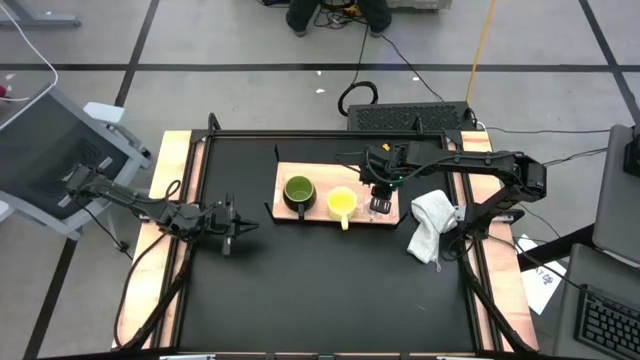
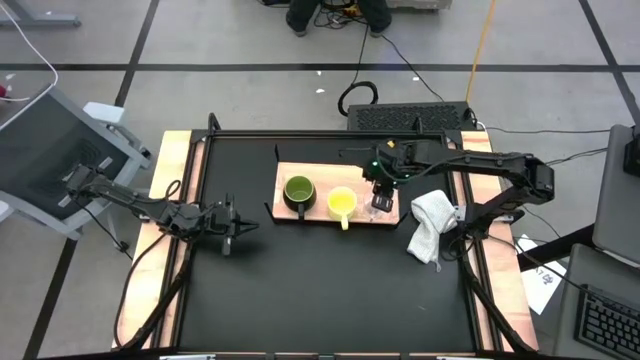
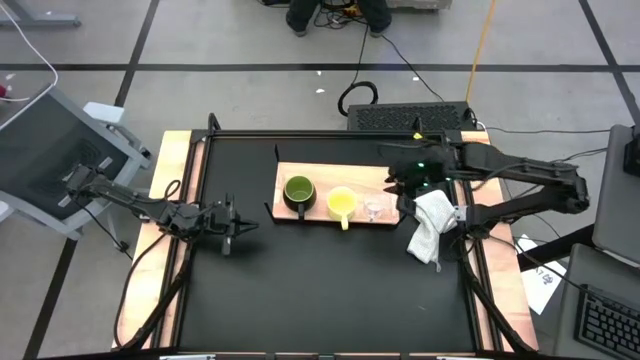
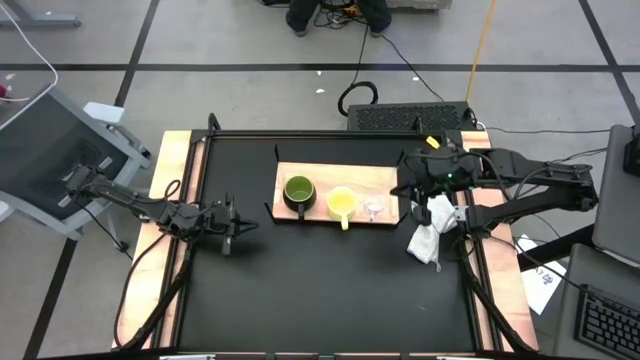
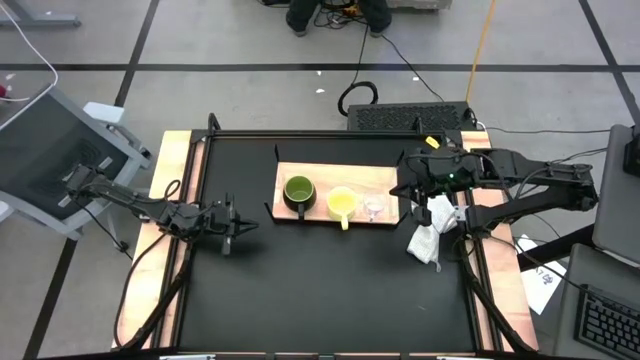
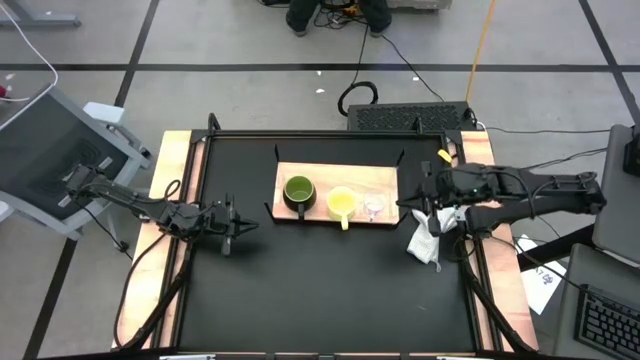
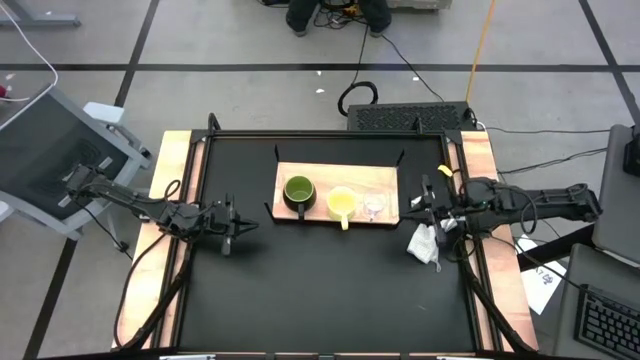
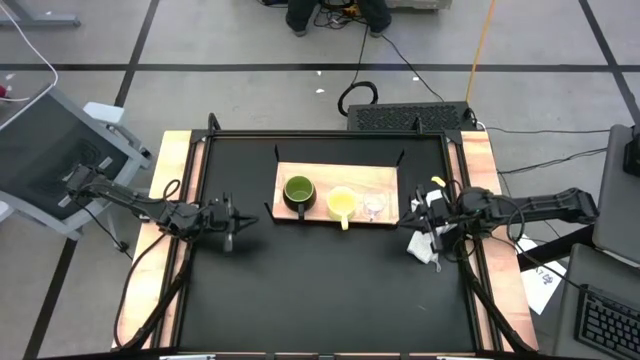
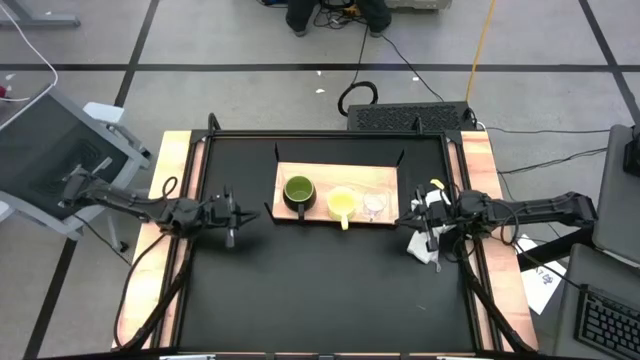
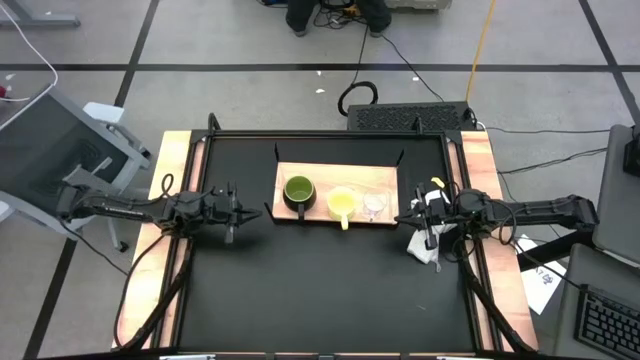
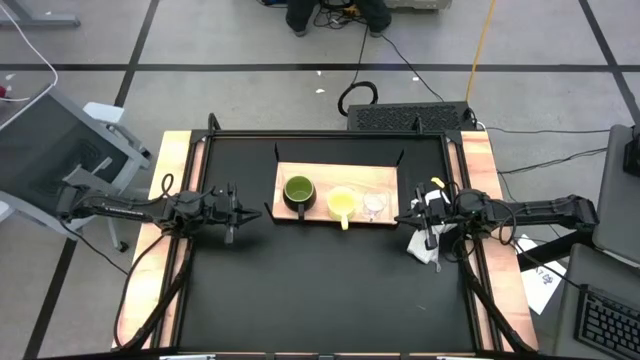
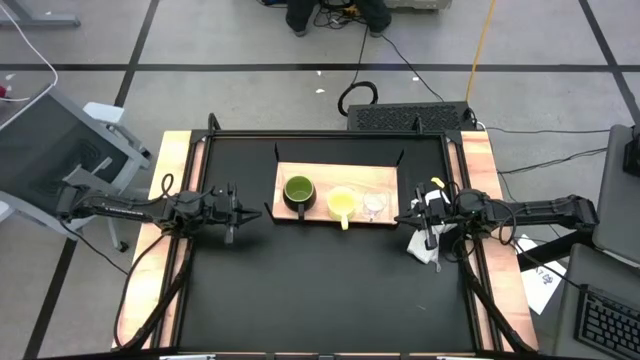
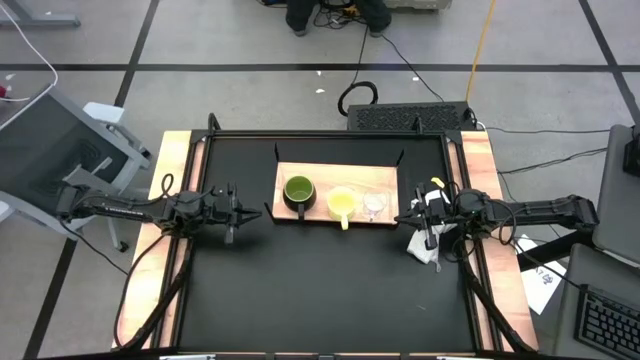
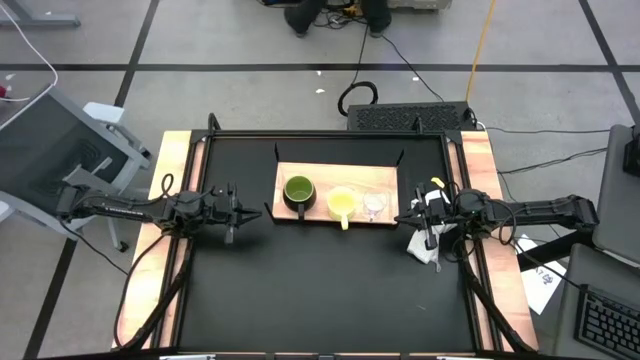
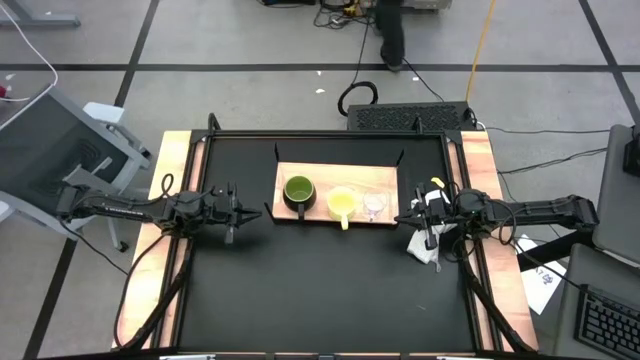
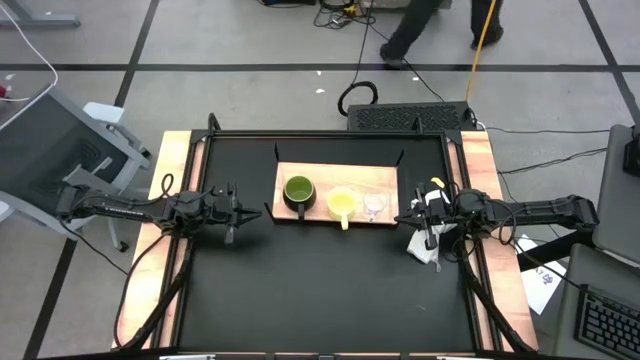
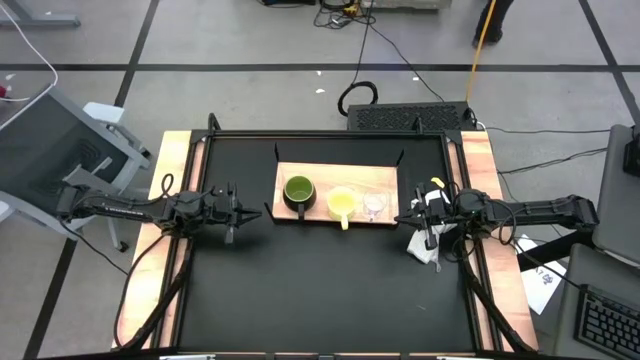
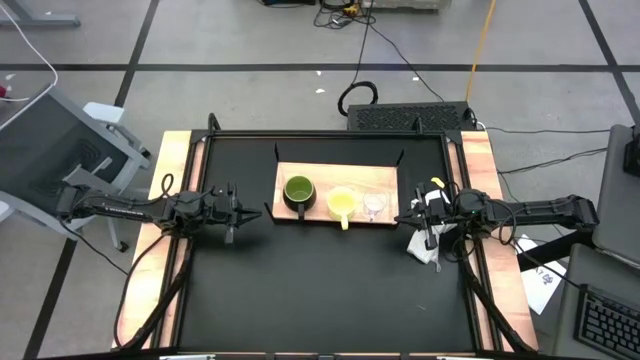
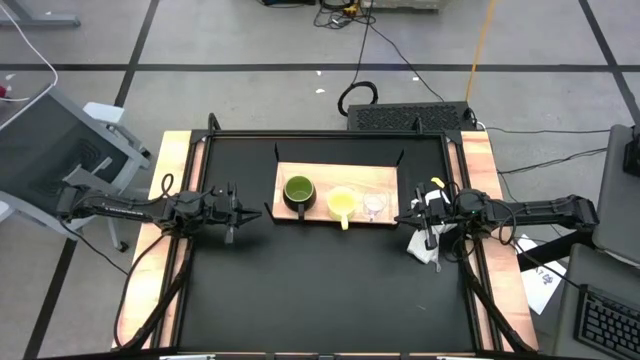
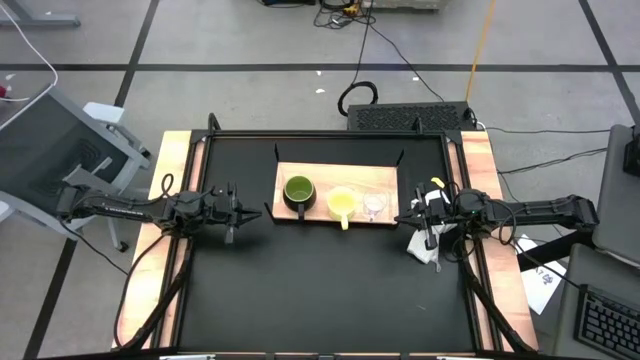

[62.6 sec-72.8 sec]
Task: Stack small to large cups/mugs on shelf
Return to Home Position

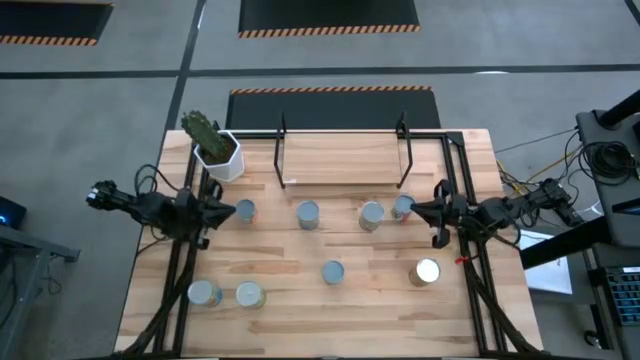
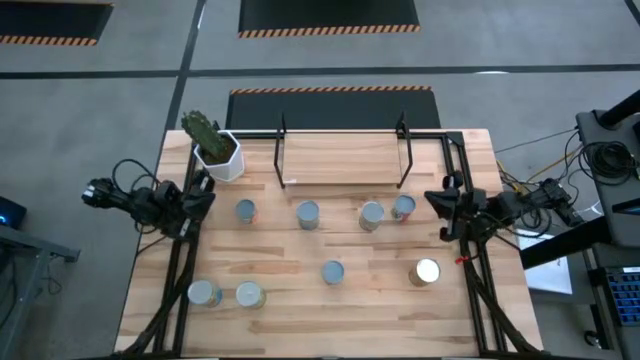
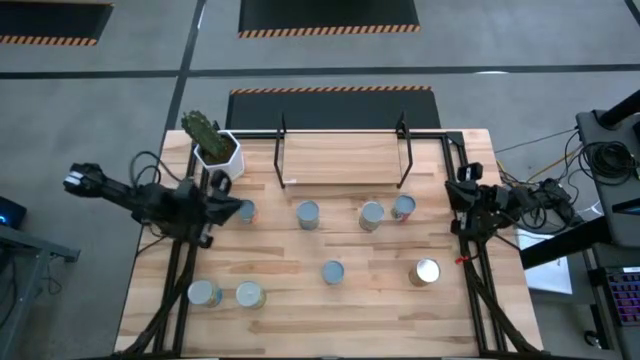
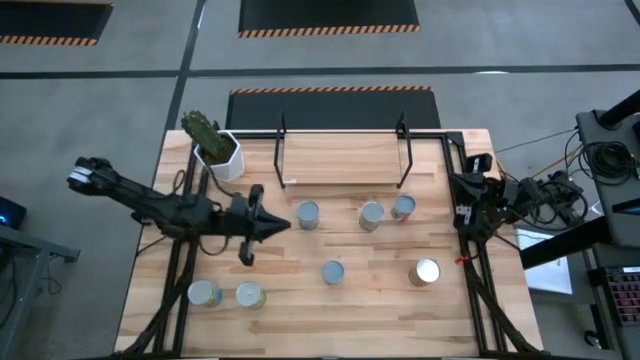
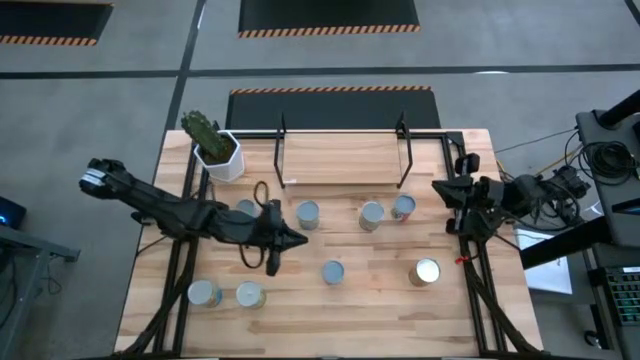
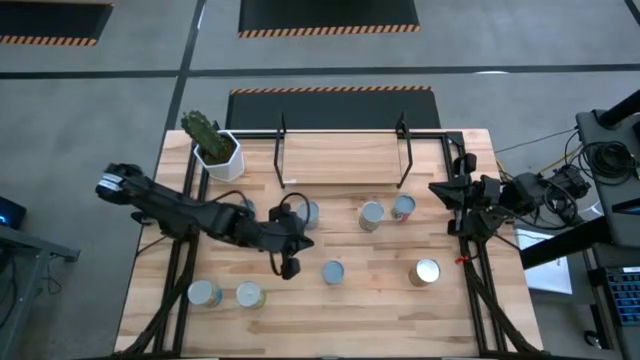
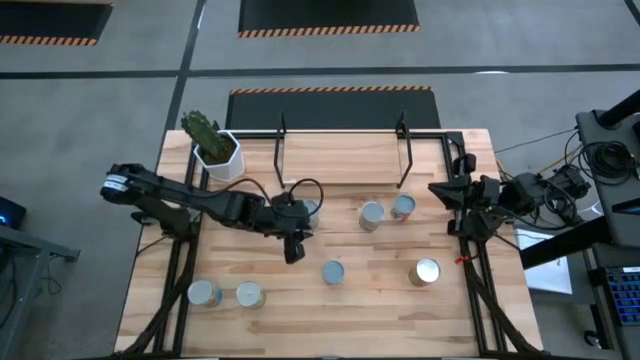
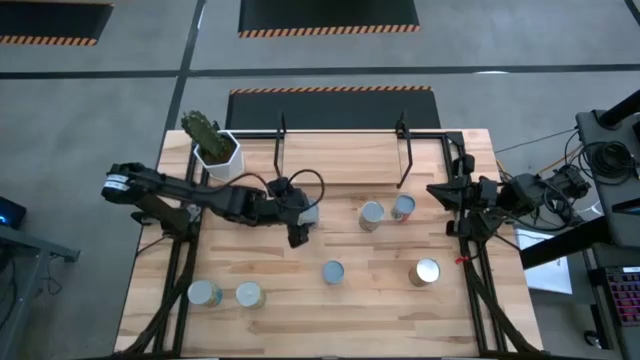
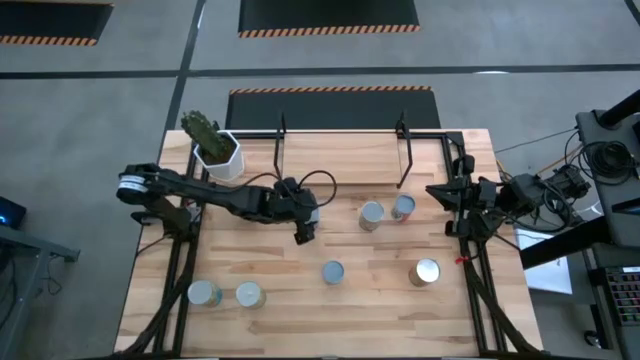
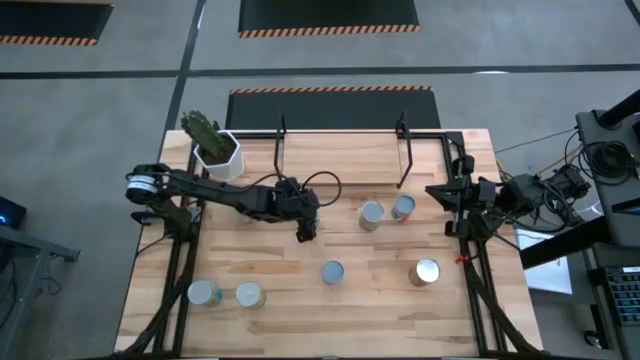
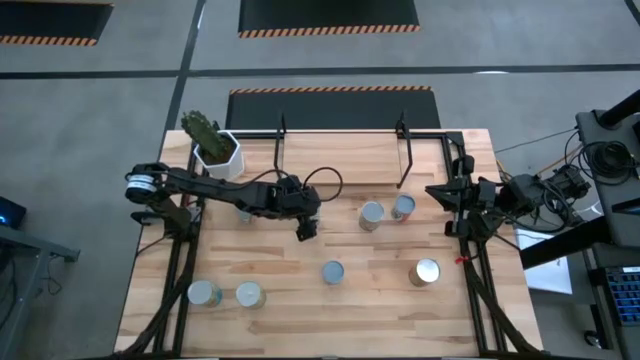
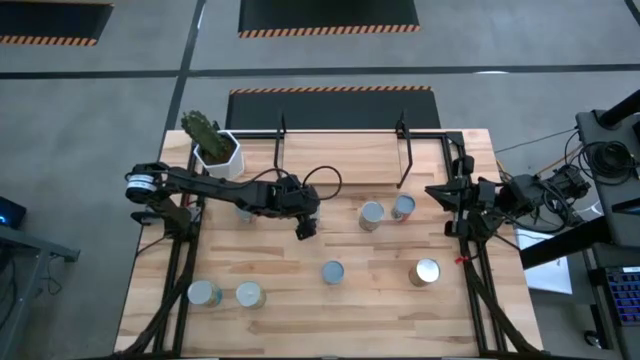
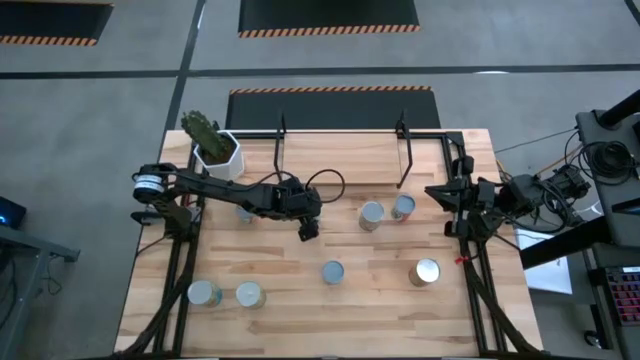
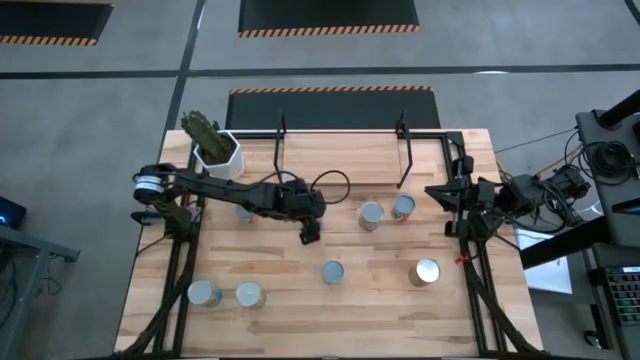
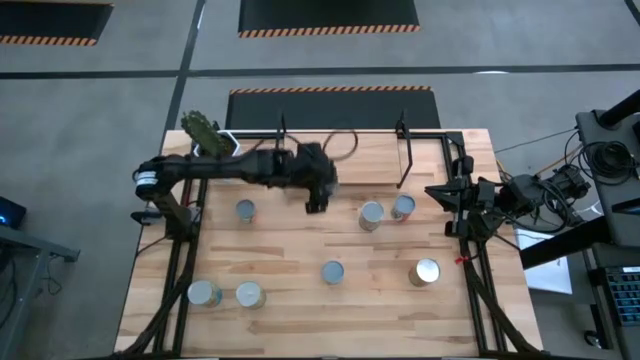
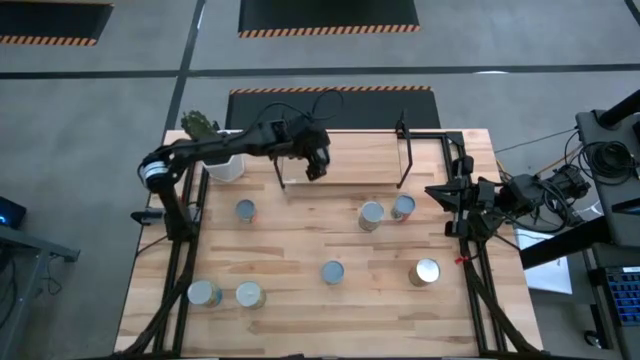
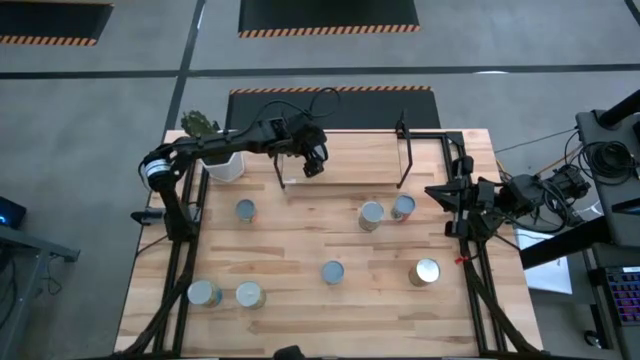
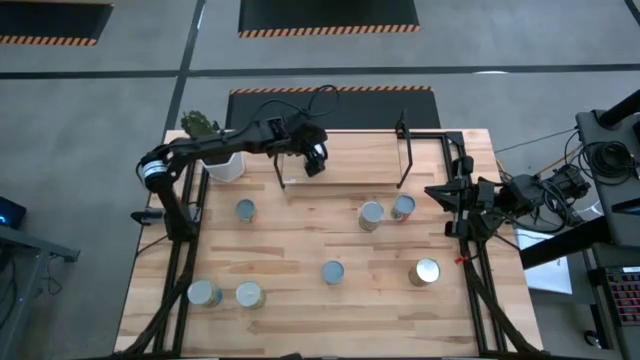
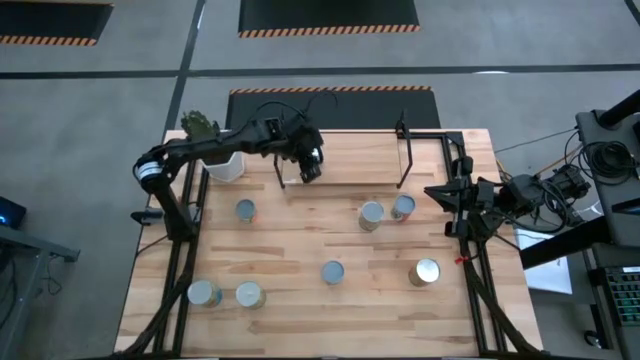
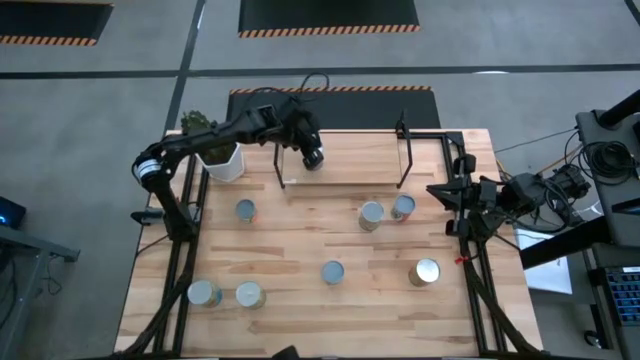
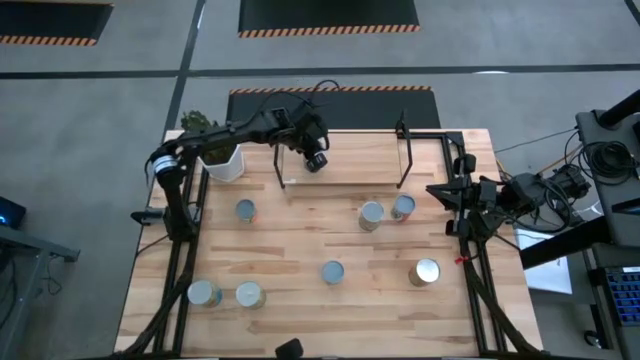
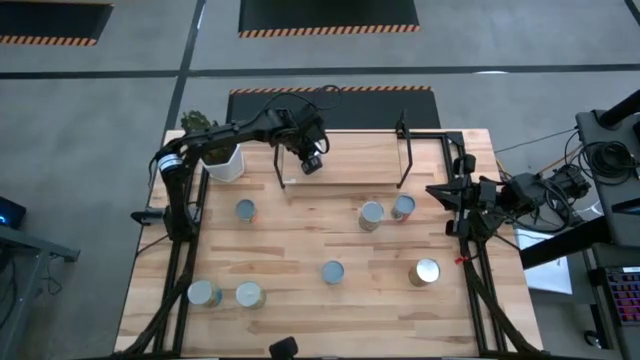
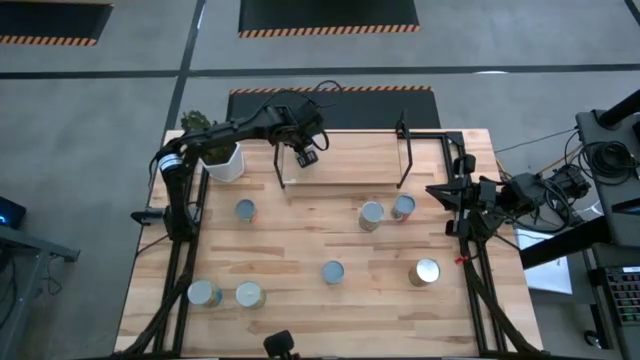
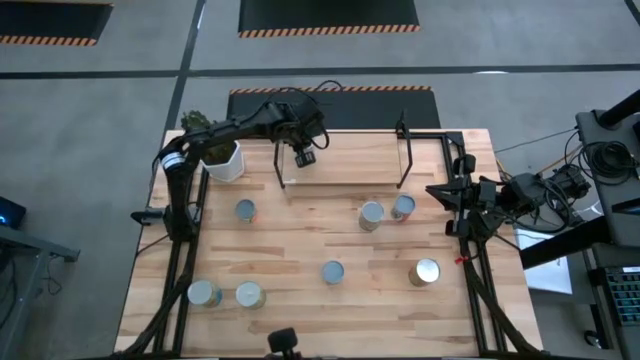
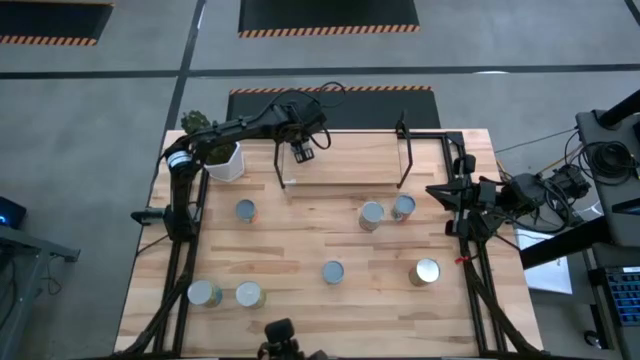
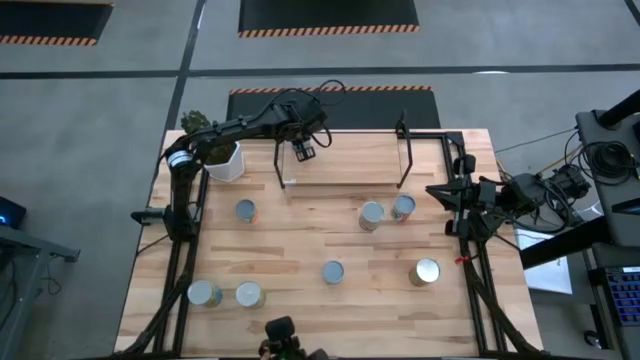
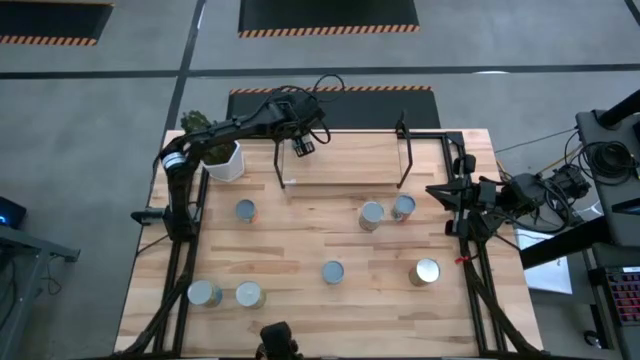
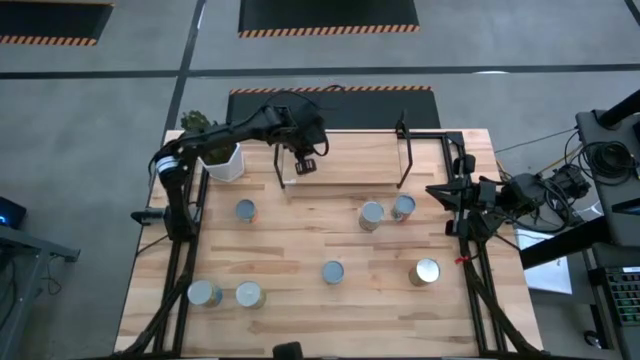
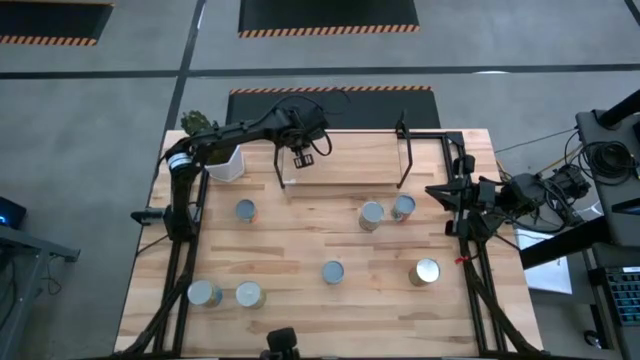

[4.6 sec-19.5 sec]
Task: Pick and place cans onto a shelf
Put the canned cherries on the shelf
